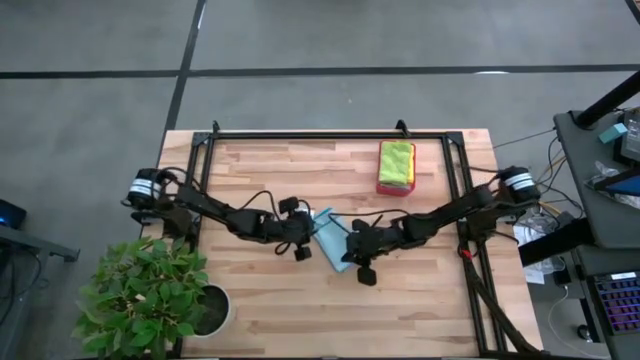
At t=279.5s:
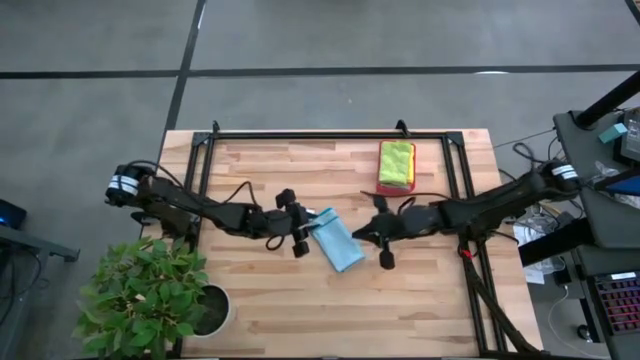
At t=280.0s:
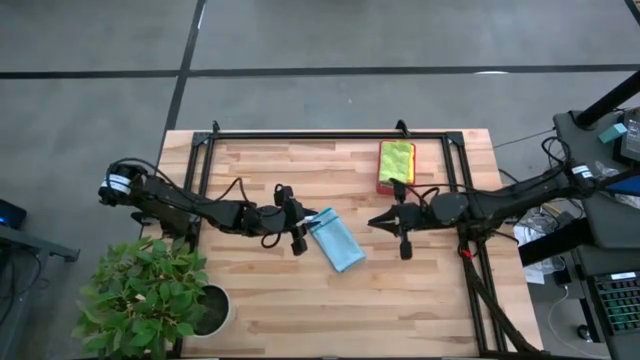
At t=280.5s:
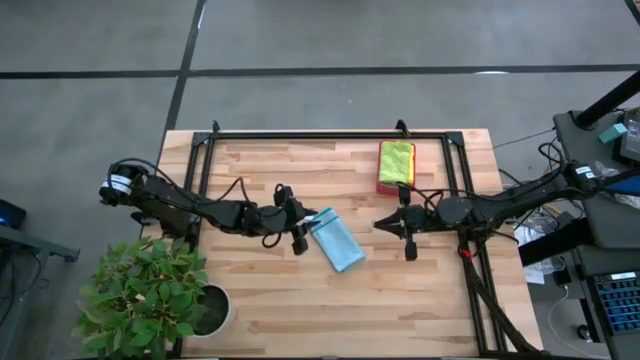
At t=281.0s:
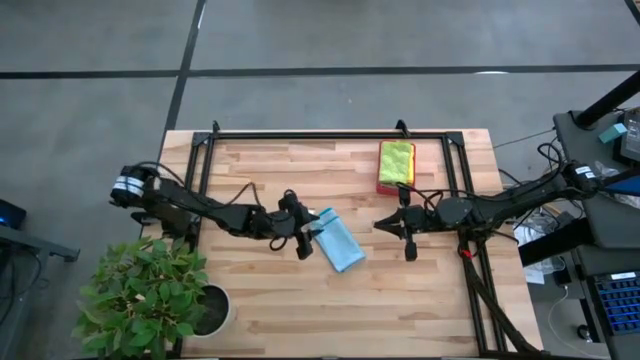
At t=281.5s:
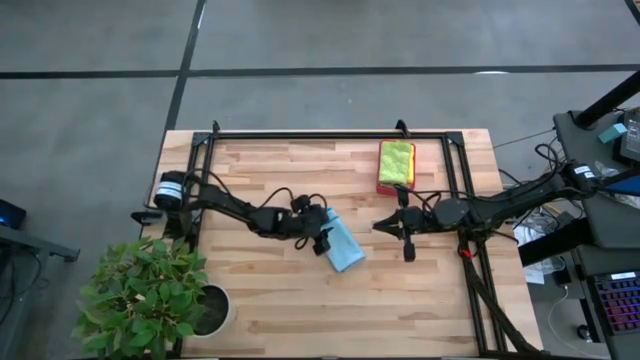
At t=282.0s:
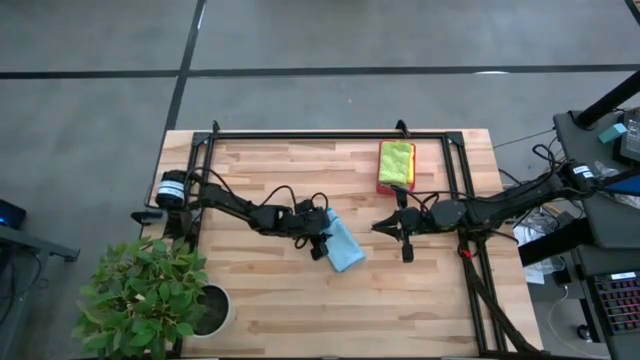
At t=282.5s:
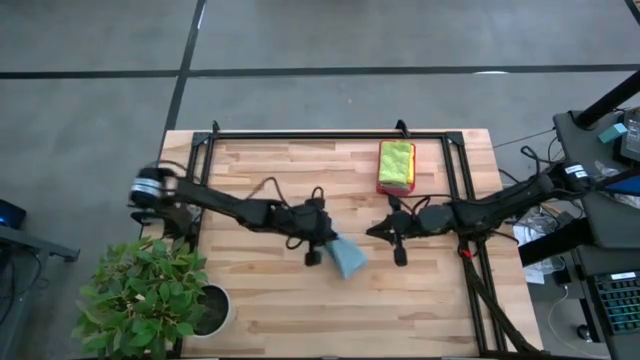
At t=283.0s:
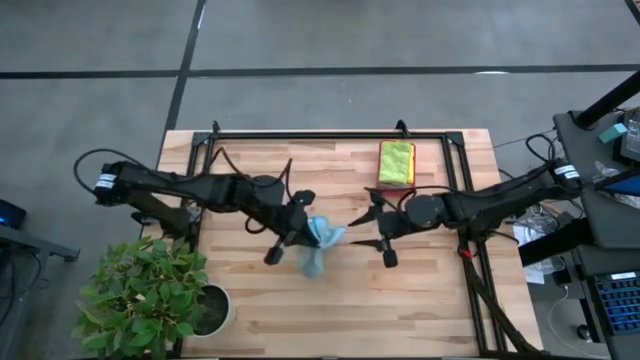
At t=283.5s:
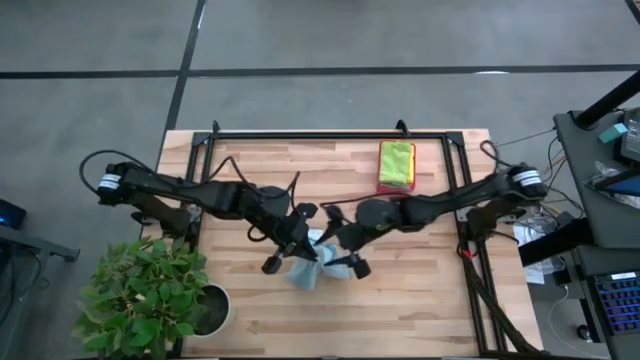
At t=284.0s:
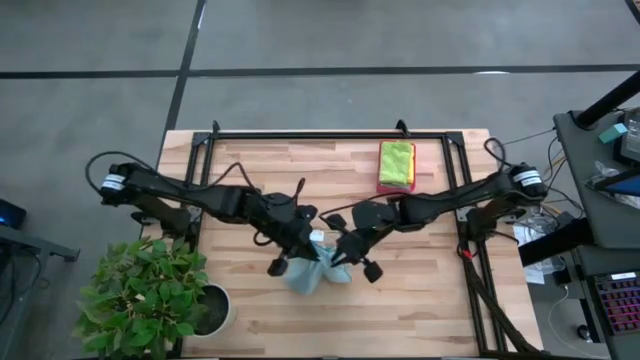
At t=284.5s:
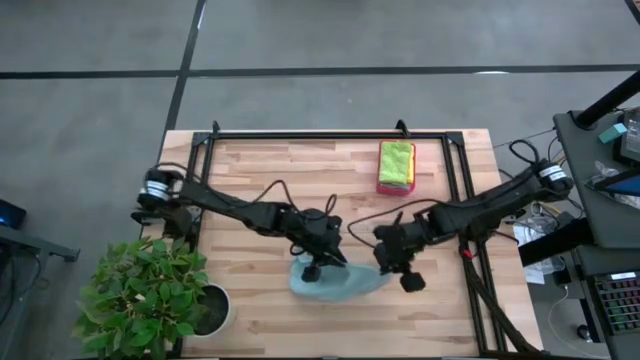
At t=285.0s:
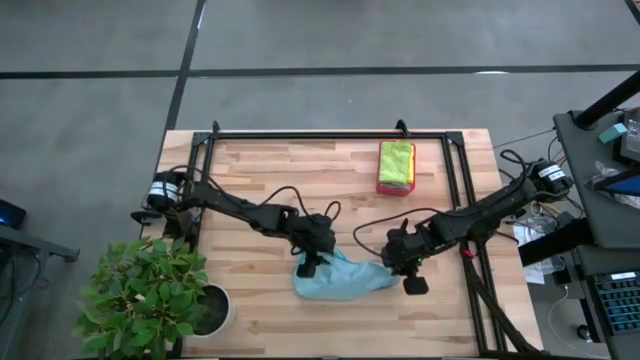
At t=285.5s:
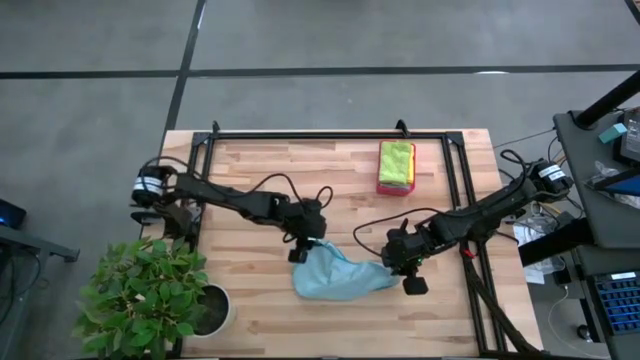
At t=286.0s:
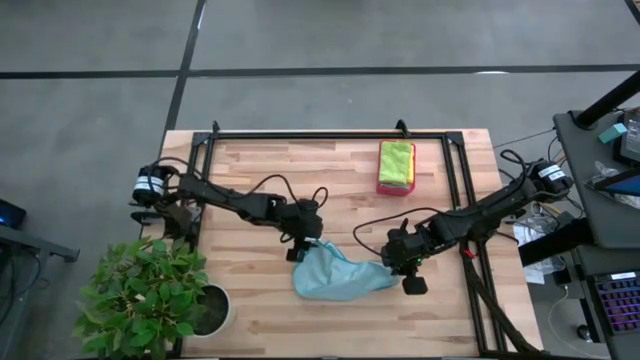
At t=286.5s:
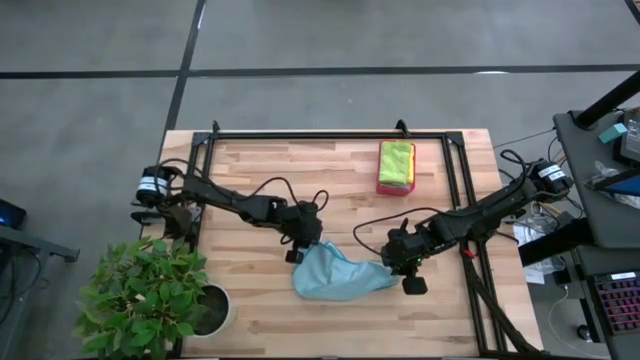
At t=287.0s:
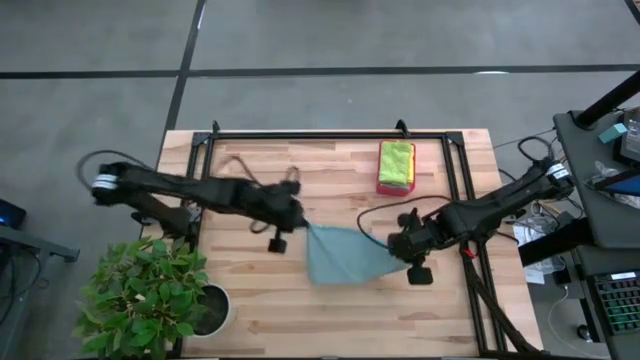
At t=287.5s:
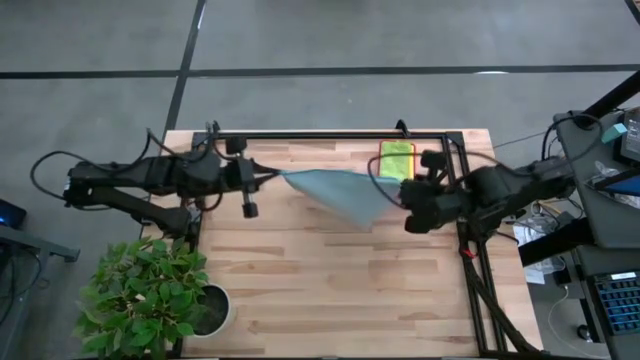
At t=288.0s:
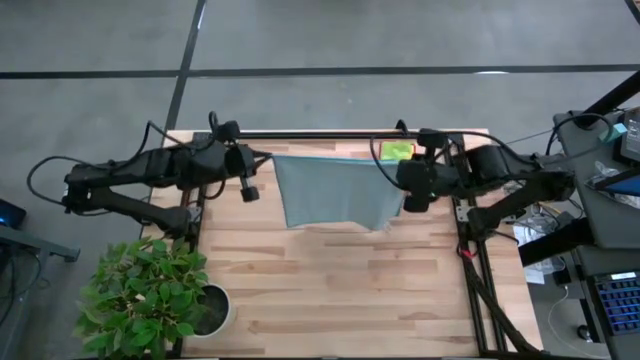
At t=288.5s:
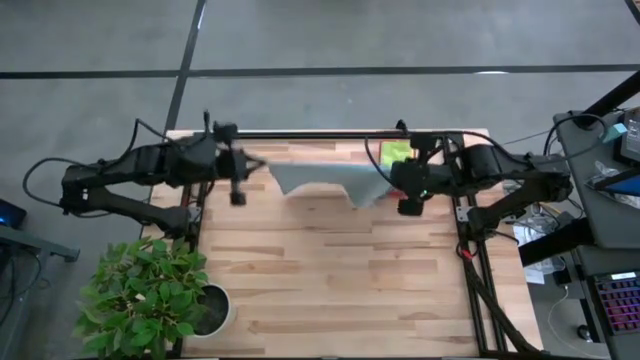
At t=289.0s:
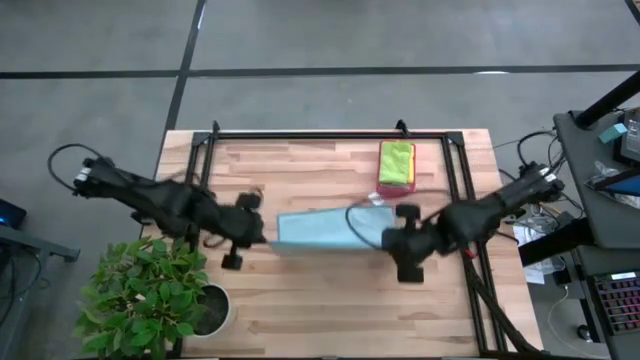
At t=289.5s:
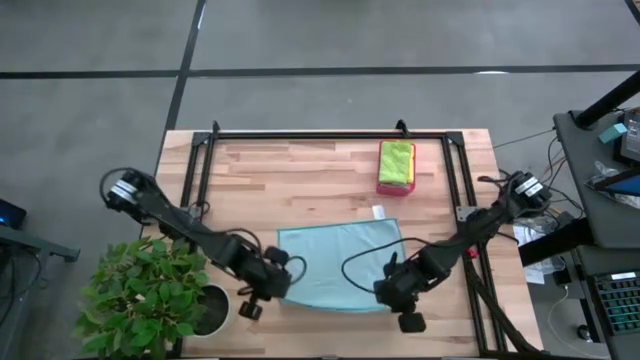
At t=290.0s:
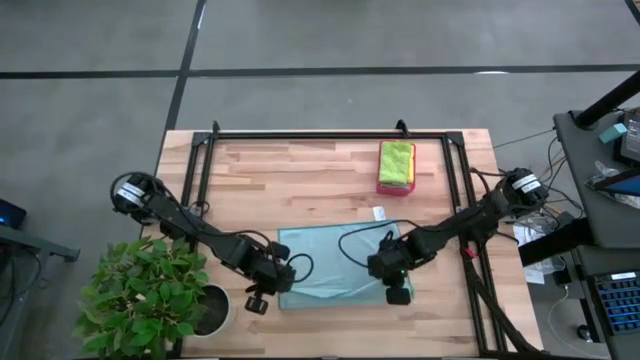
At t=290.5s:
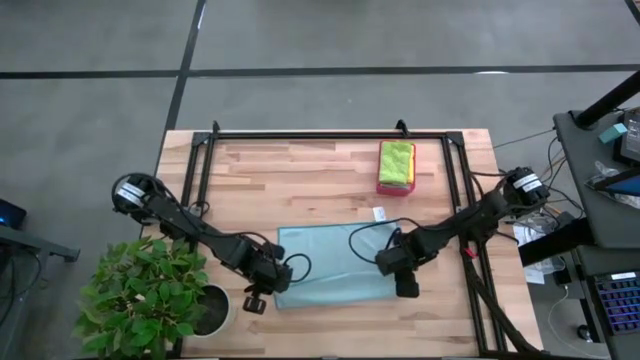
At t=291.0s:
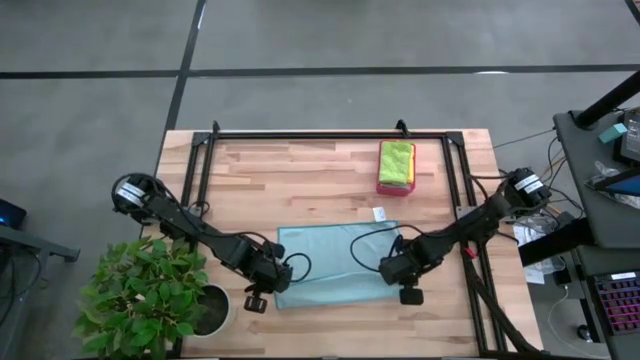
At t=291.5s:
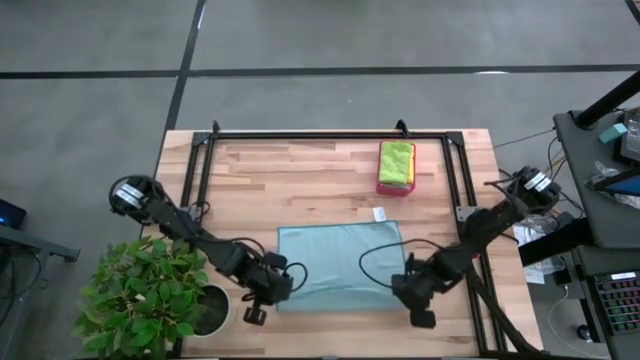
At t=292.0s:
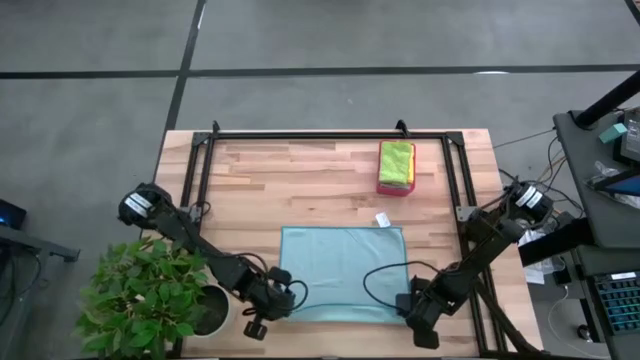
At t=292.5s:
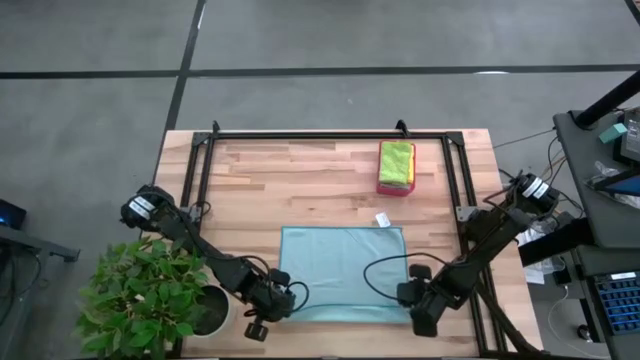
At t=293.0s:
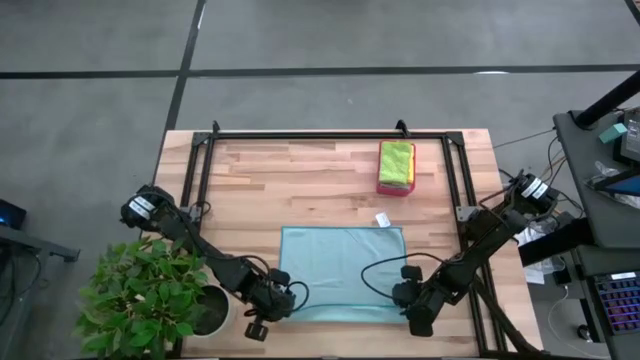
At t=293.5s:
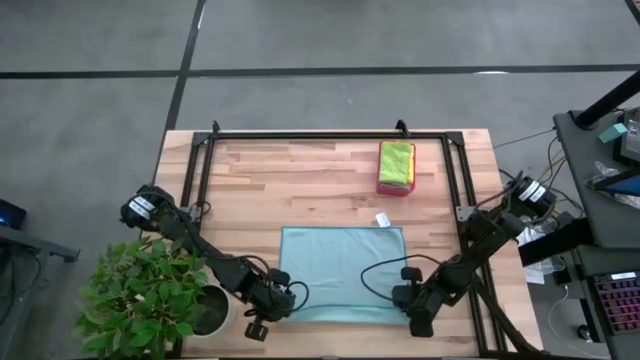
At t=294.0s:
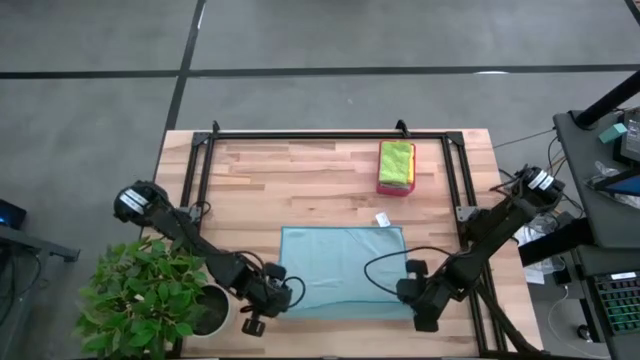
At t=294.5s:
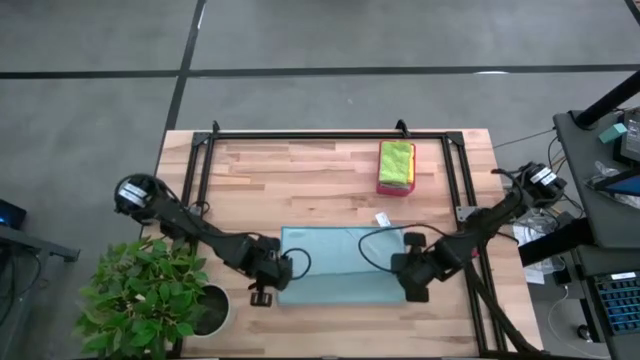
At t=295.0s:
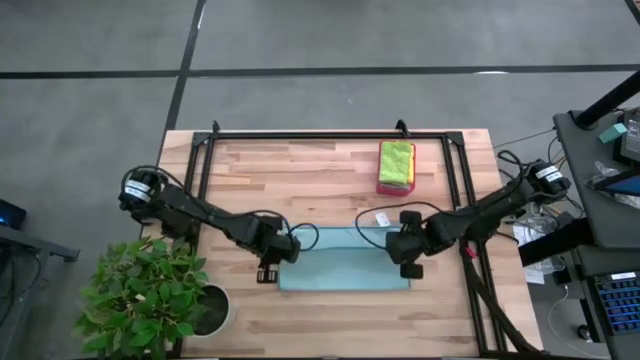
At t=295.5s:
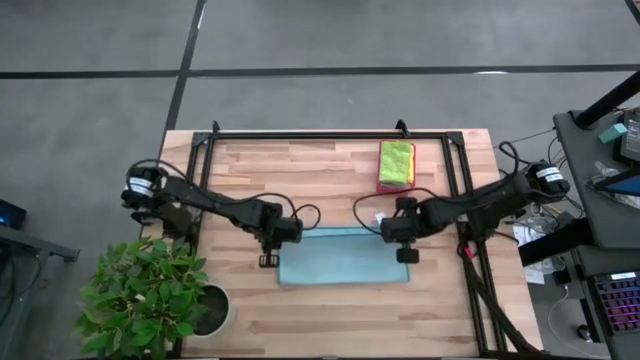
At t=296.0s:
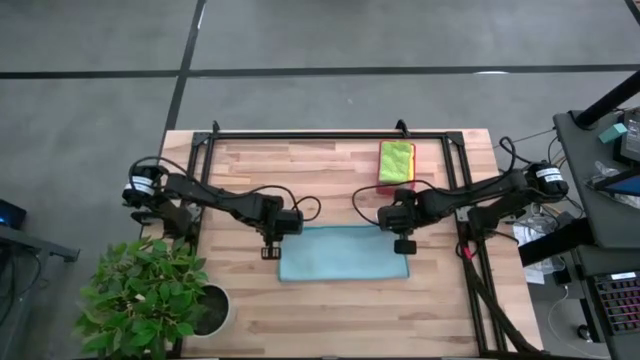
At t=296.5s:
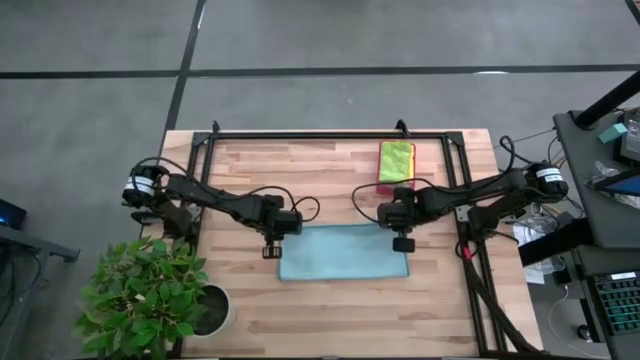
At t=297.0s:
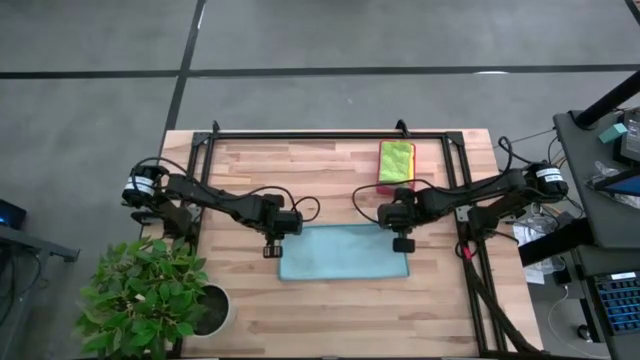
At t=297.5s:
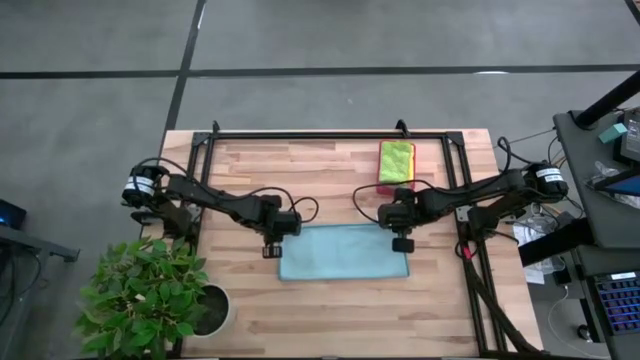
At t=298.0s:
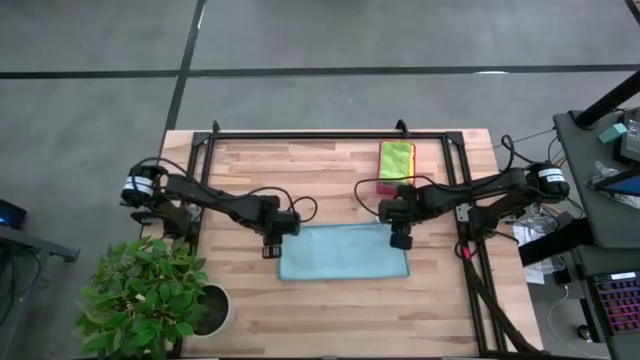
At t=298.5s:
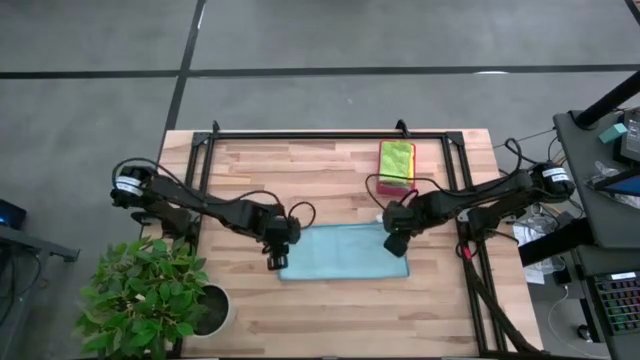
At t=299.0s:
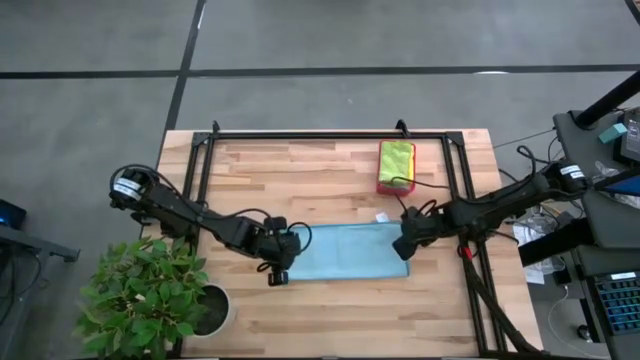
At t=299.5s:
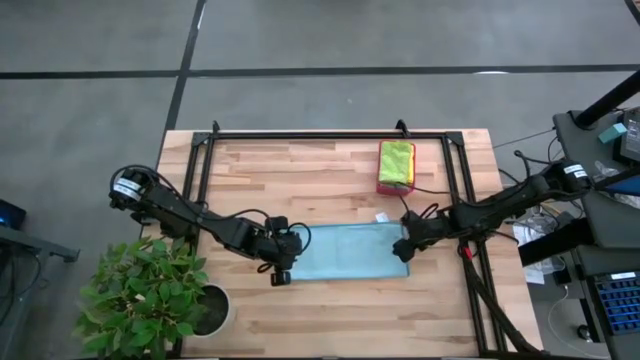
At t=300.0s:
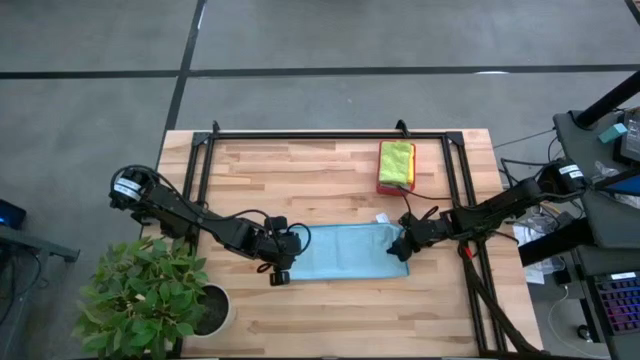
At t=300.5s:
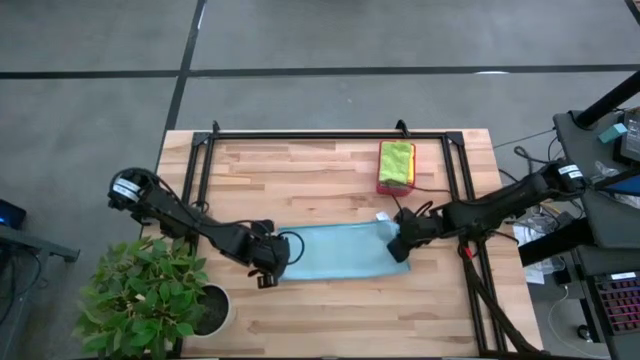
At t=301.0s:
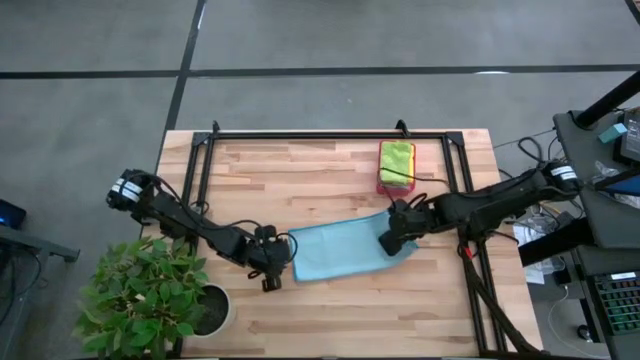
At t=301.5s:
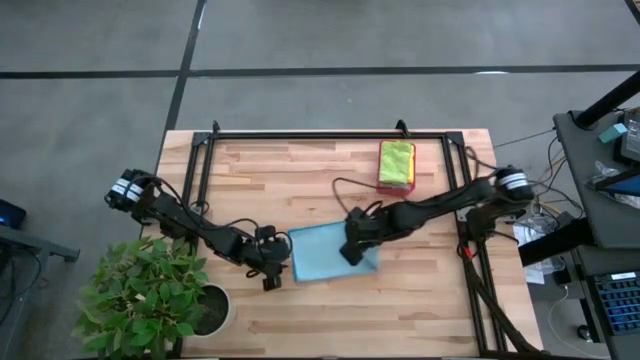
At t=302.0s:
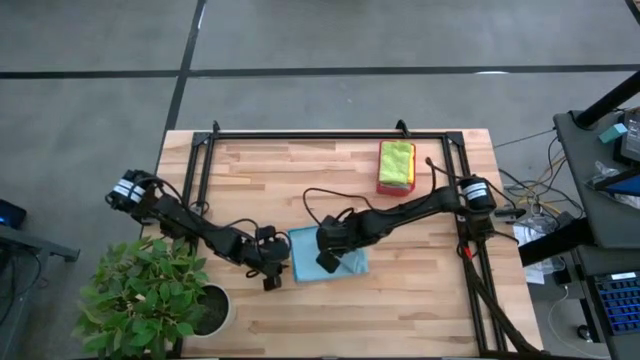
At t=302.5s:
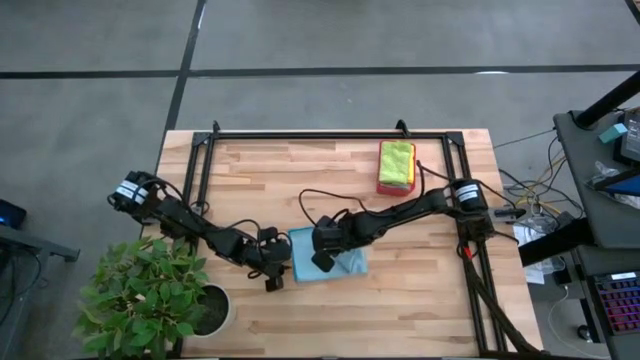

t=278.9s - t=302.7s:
Task: Fold microfiber towels
Fold the blue microfiber towel
